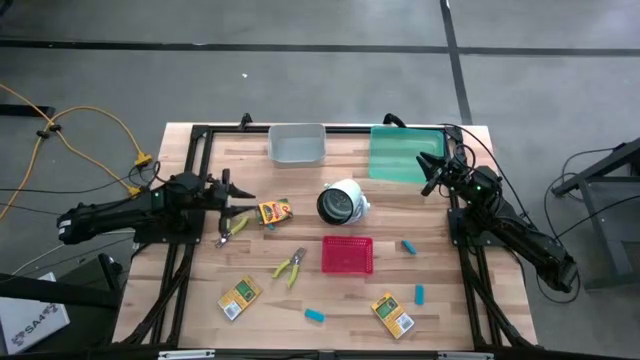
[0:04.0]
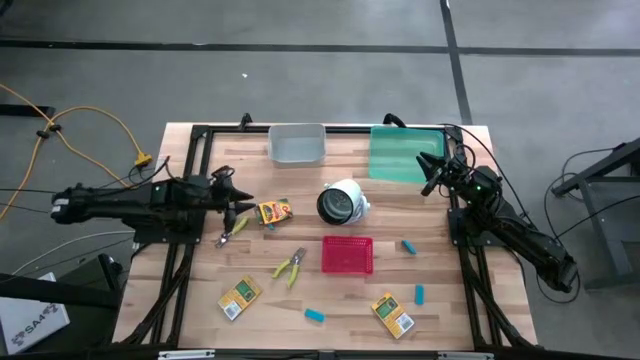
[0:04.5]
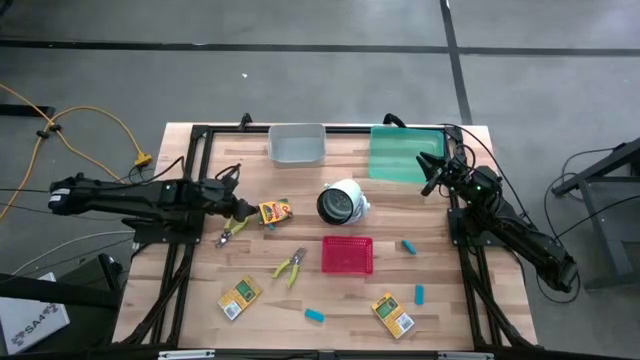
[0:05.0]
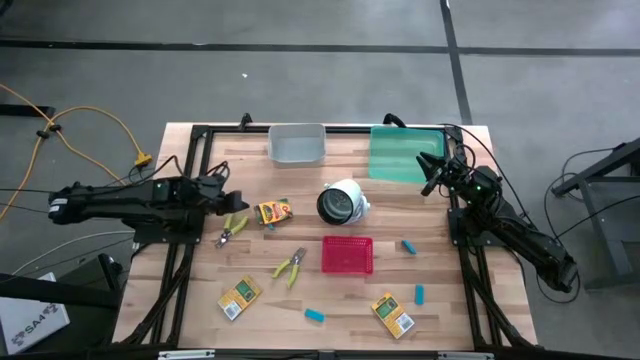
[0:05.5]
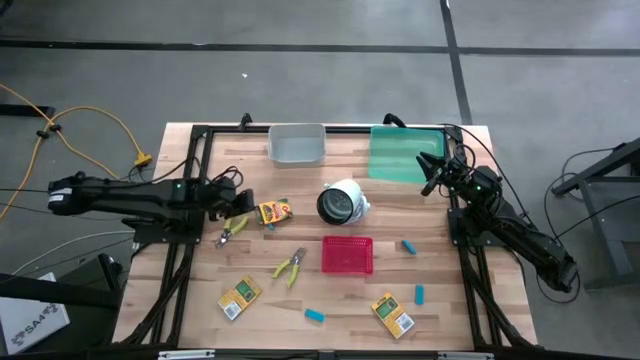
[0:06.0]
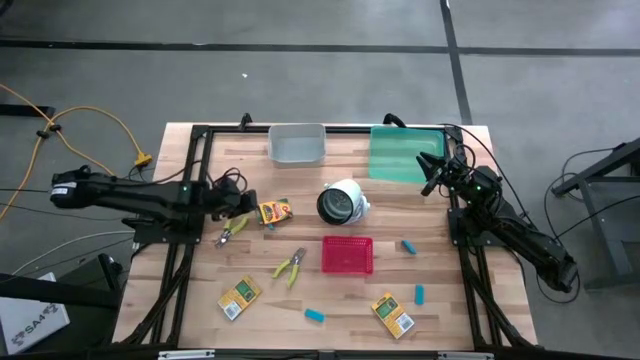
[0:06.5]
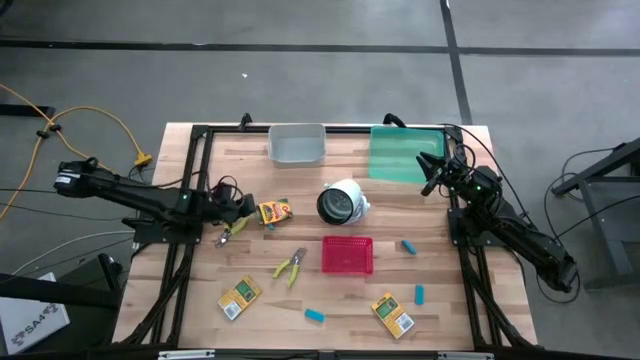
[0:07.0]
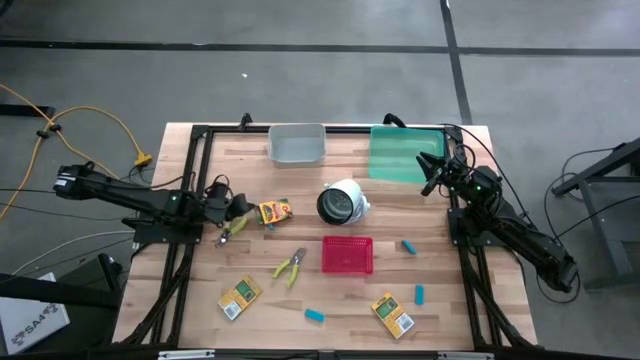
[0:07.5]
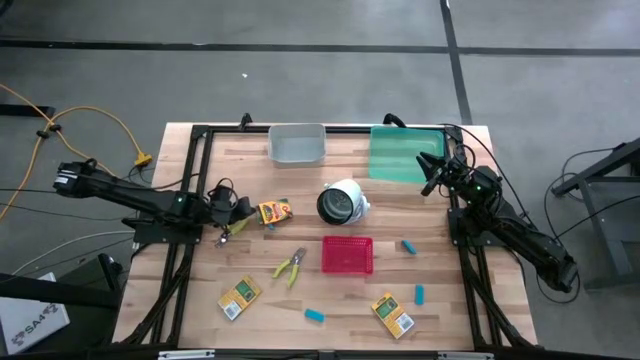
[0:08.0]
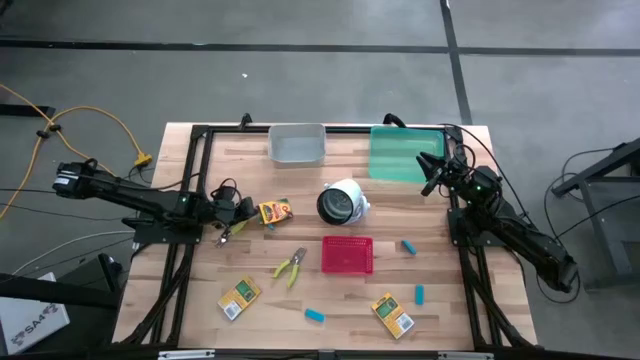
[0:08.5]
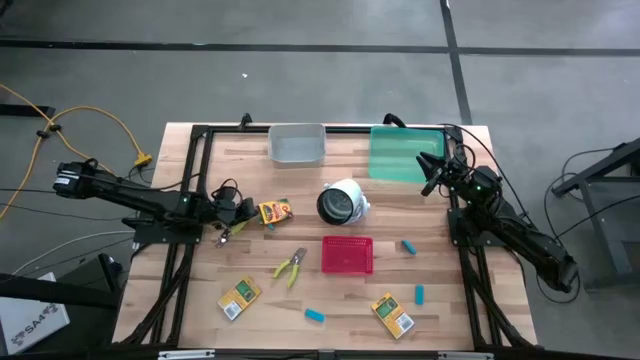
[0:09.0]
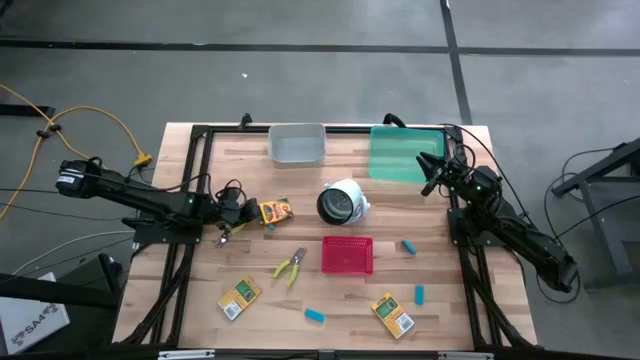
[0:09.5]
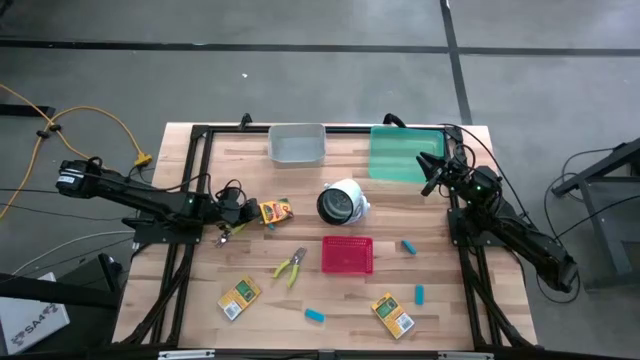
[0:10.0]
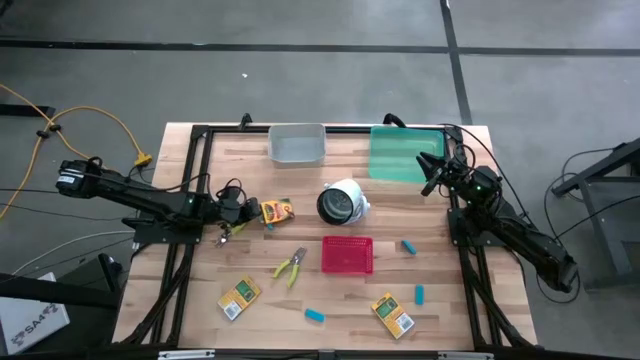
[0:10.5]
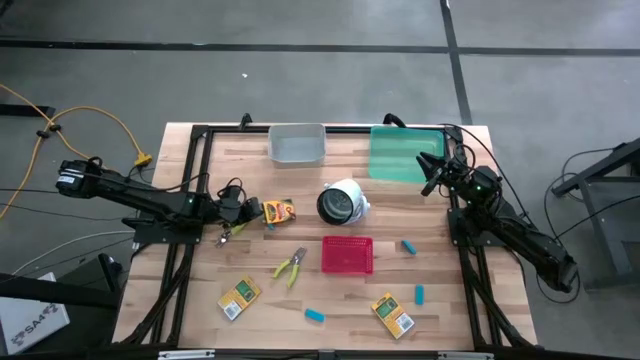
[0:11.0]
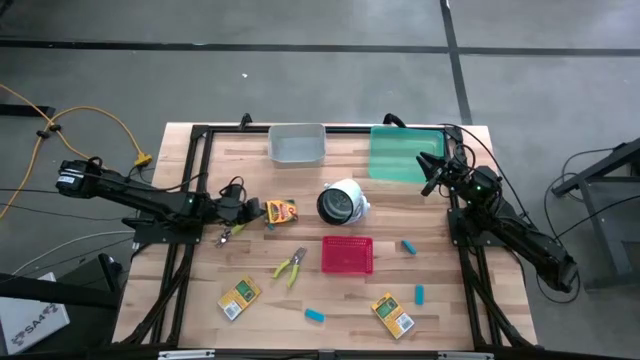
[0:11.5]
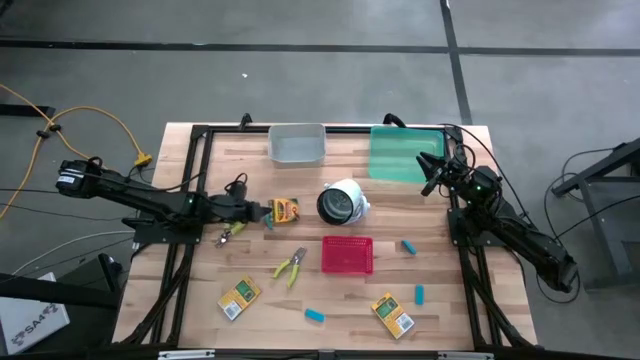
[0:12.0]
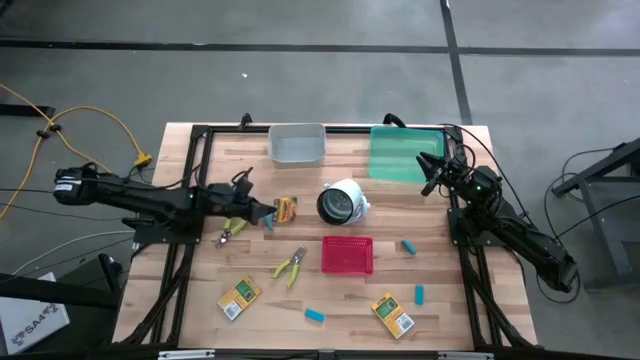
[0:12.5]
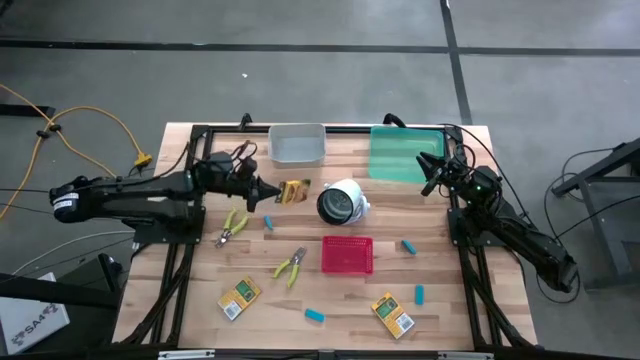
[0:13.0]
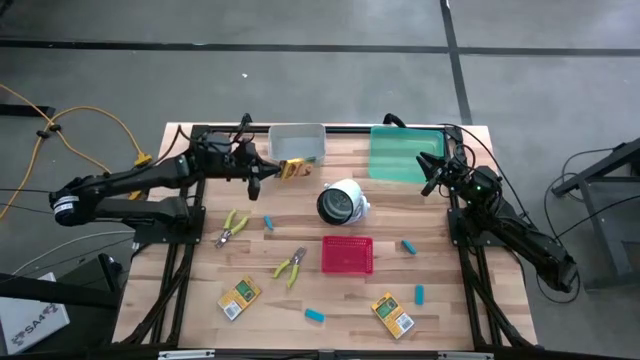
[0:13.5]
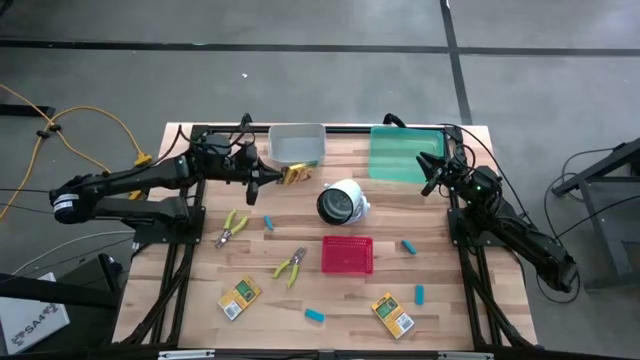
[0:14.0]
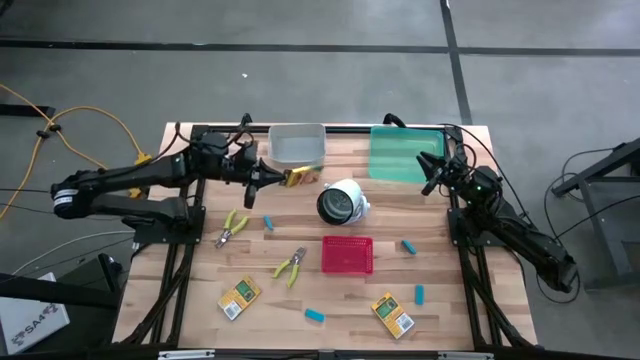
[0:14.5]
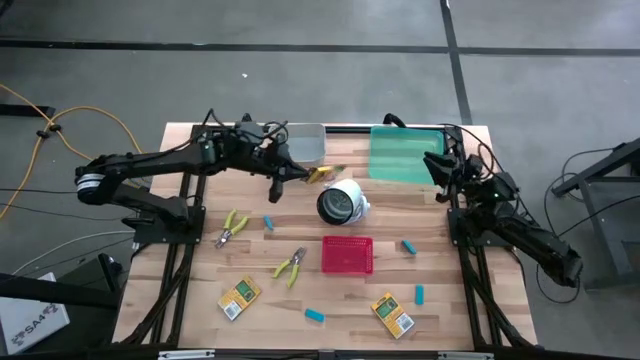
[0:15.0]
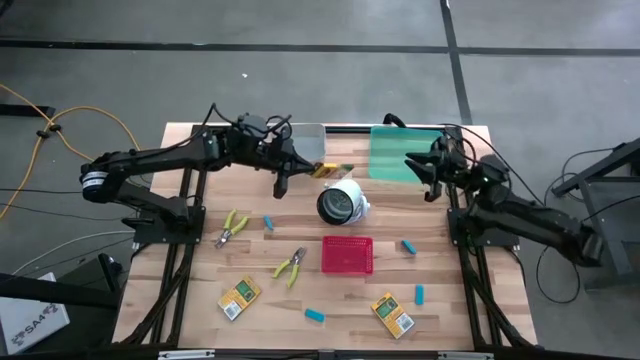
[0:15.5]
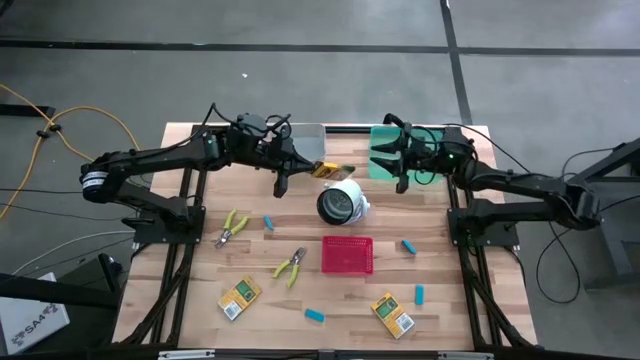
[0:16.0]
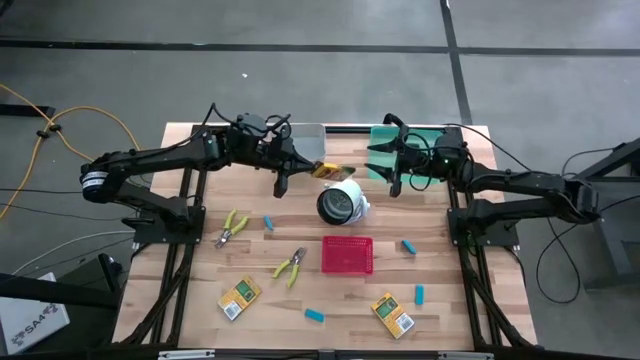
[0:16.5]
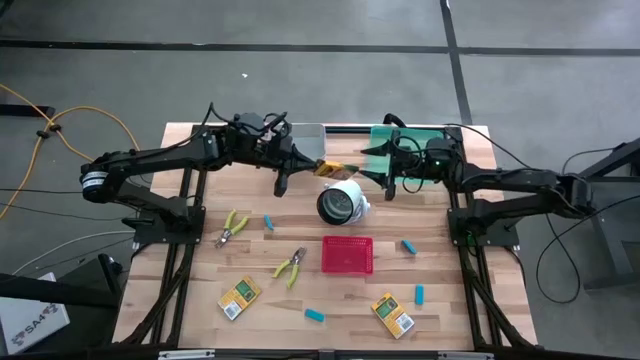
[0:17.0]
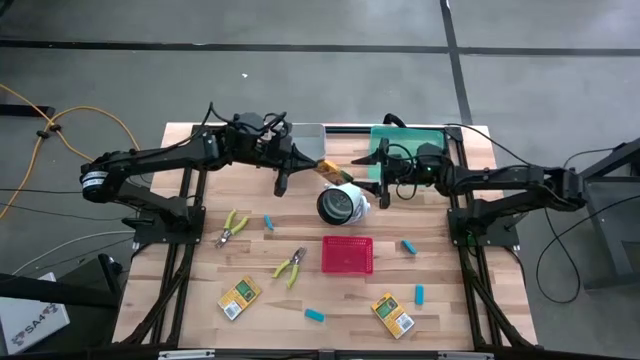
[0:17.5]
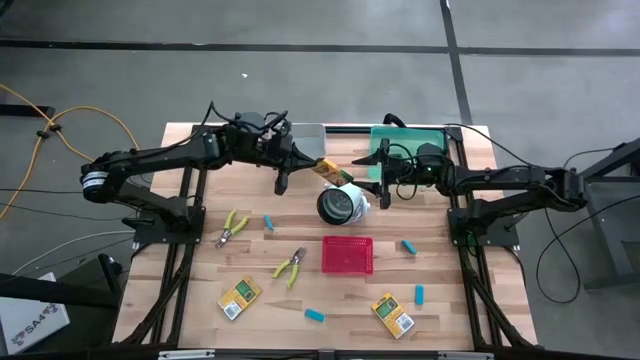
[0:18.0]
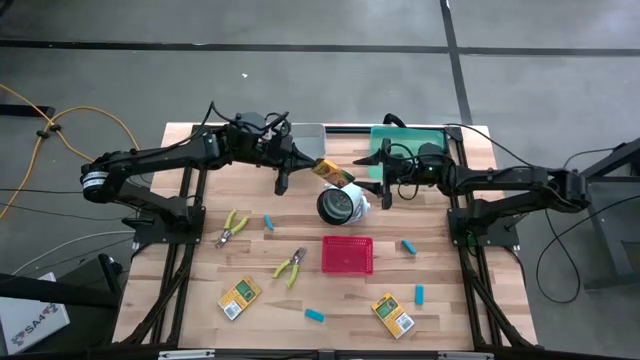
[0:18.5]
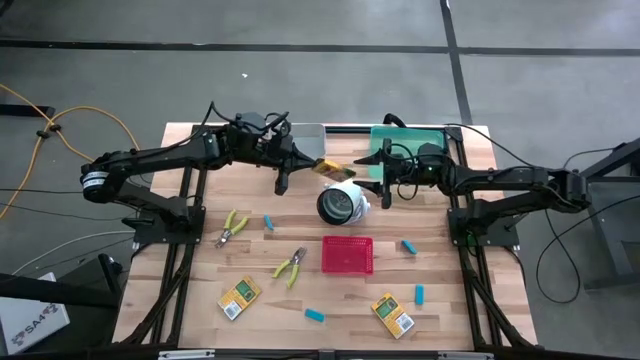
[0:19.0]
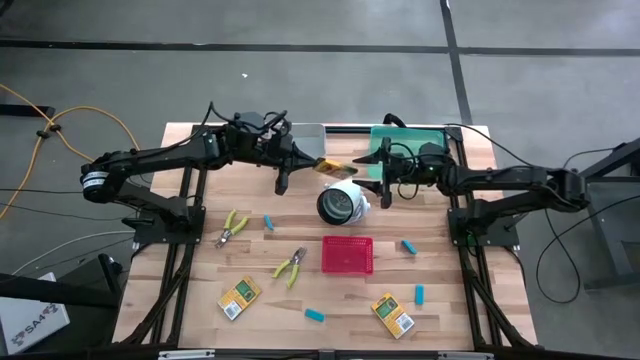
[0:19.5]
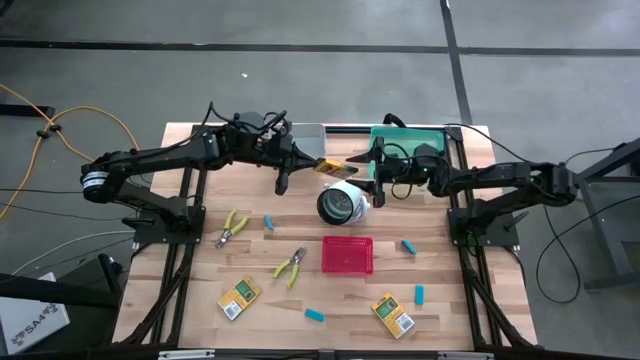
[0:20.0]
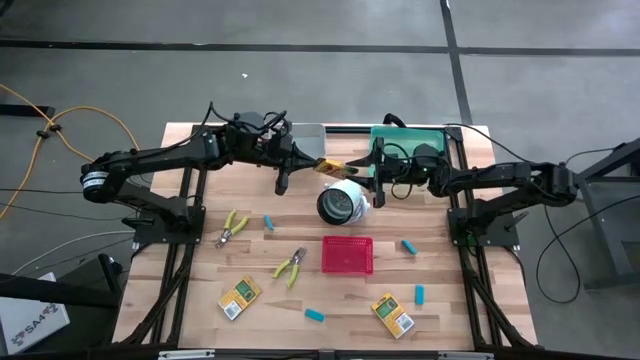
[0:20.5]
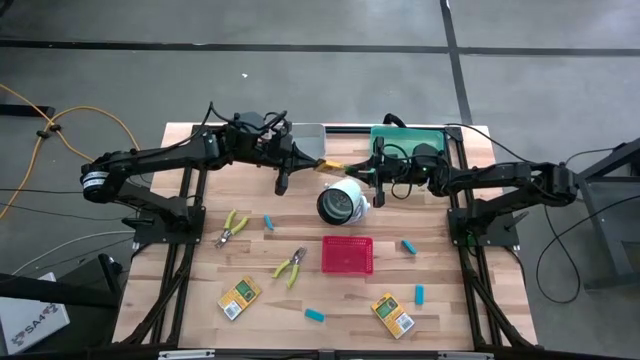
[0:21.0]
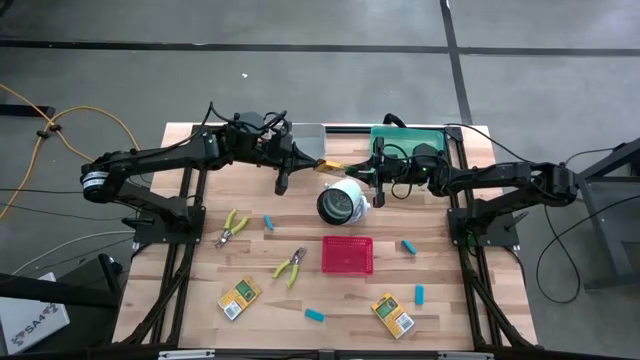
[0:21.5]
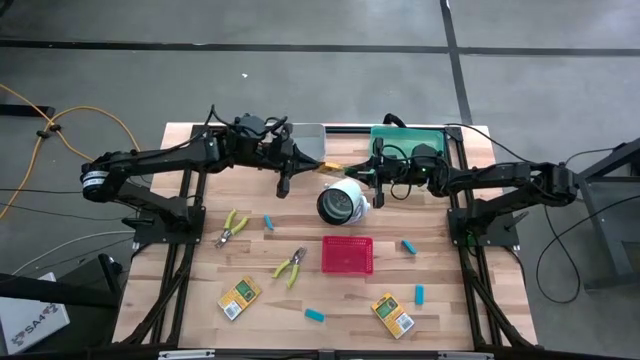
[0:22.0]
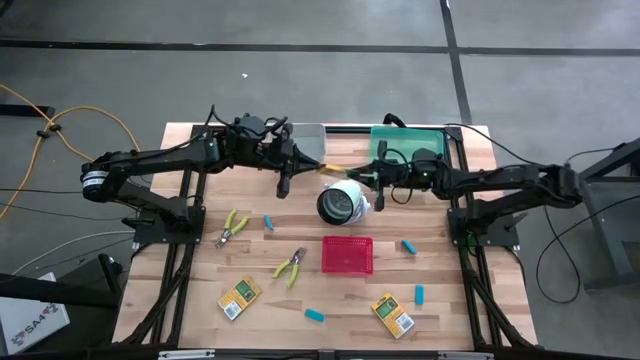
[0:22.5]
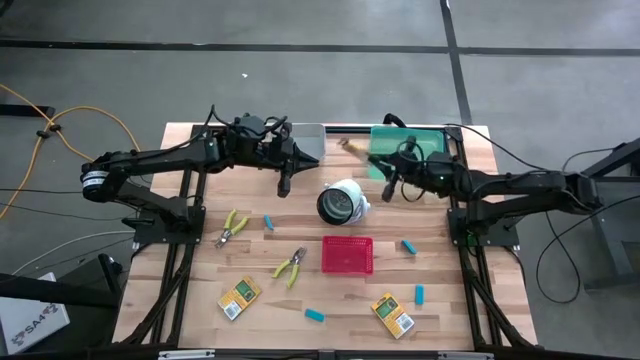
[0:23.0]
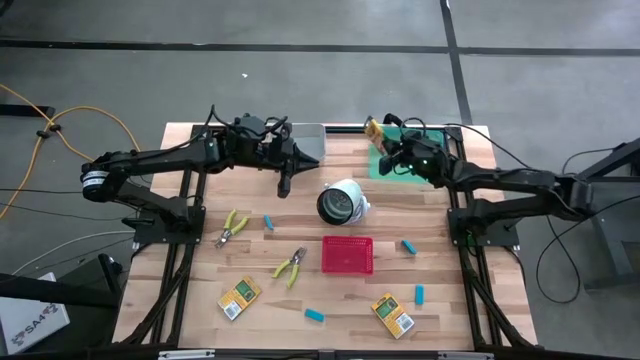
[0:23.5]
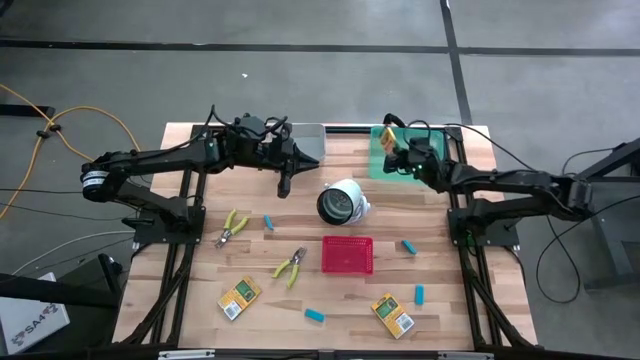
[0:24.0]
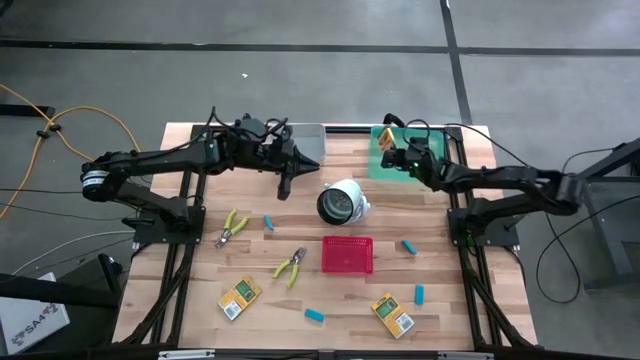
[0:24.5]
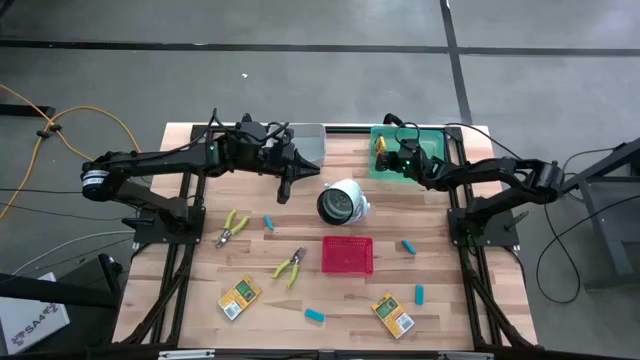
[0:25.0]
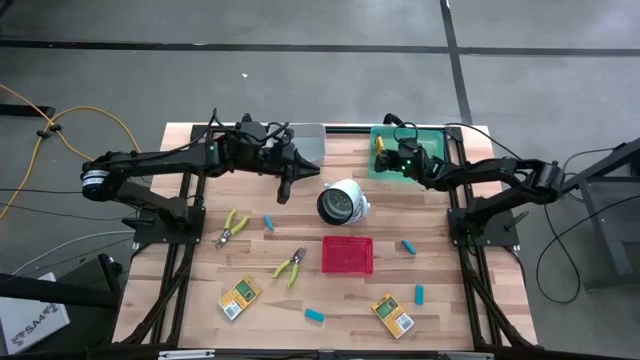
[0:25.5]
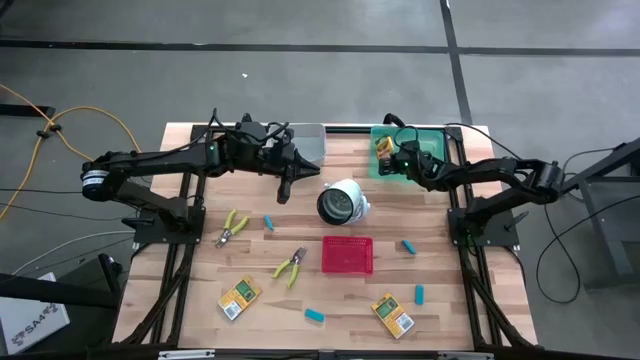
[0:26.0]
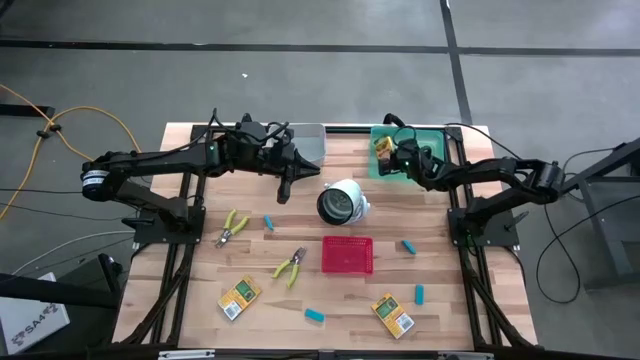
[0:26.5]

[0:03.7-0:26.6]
Task: Pick & Place School Supplies
Put the yellow crayon box into the green bin
